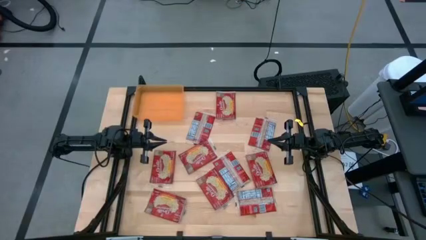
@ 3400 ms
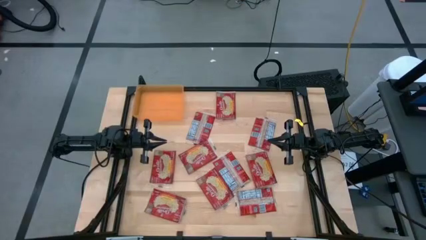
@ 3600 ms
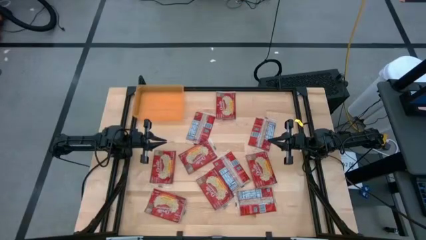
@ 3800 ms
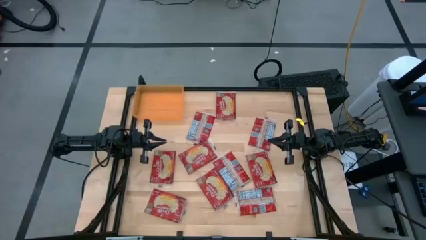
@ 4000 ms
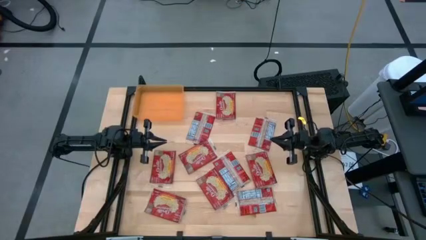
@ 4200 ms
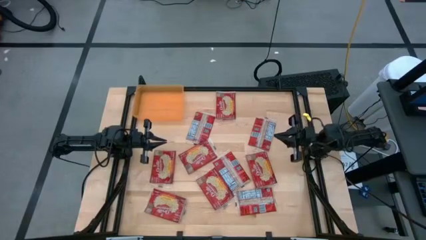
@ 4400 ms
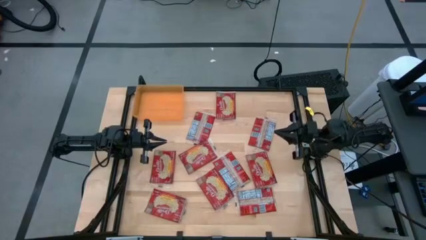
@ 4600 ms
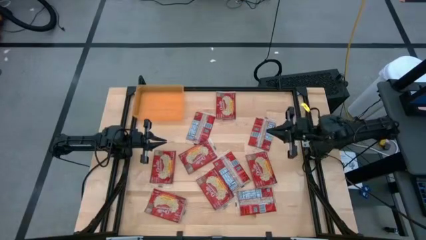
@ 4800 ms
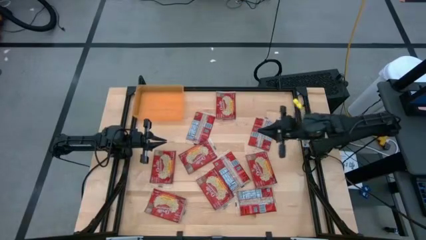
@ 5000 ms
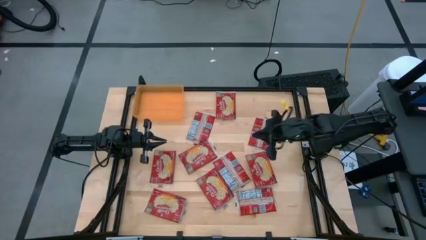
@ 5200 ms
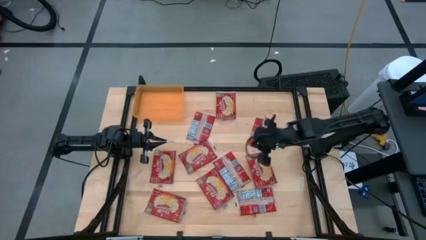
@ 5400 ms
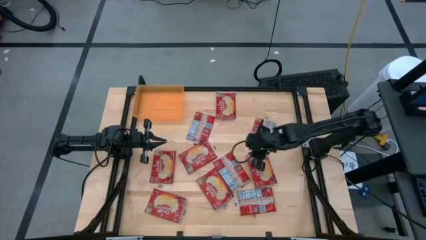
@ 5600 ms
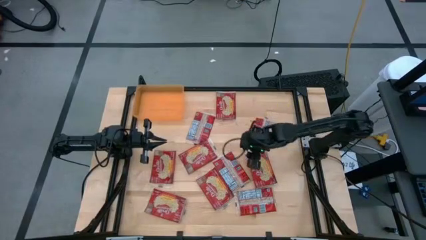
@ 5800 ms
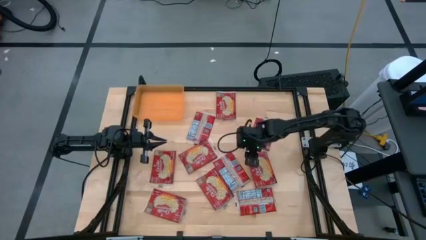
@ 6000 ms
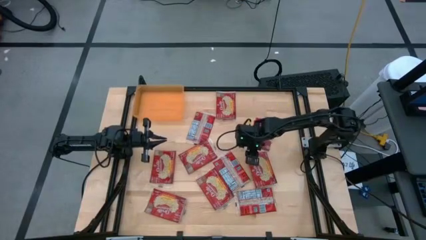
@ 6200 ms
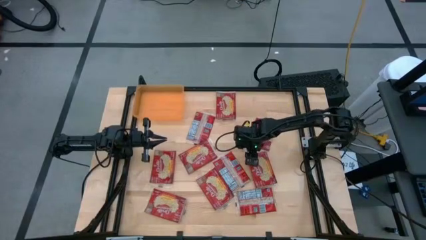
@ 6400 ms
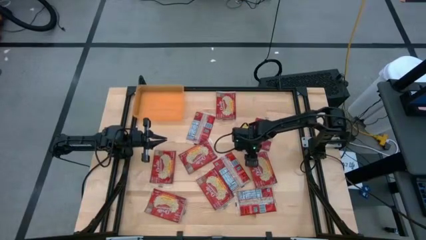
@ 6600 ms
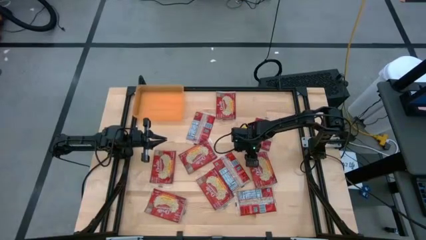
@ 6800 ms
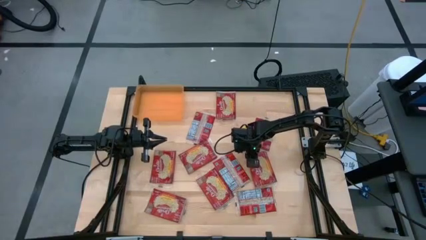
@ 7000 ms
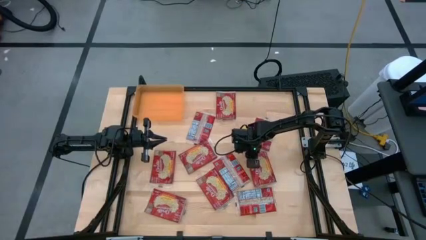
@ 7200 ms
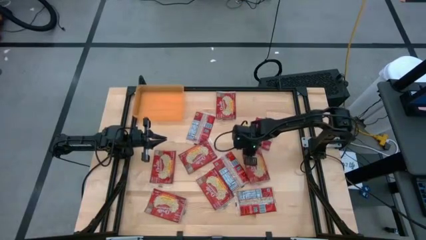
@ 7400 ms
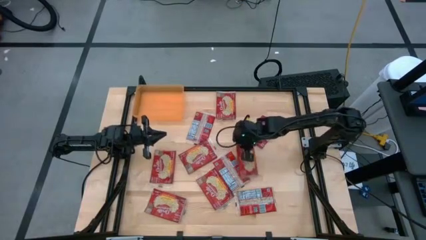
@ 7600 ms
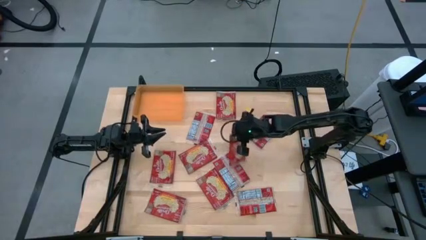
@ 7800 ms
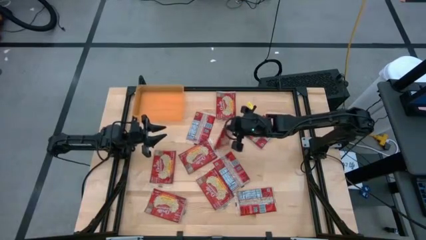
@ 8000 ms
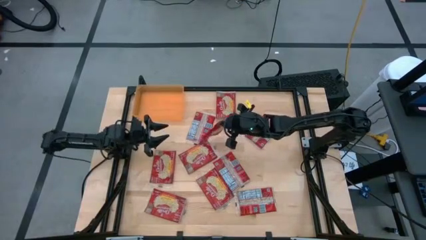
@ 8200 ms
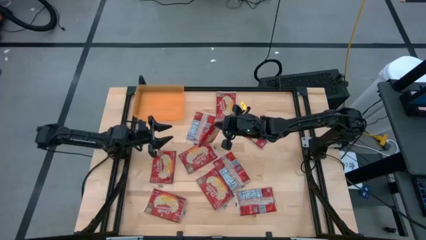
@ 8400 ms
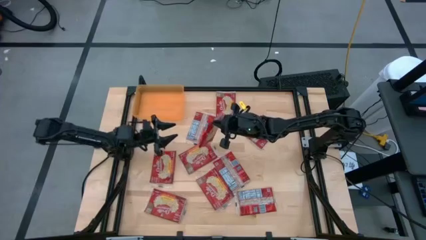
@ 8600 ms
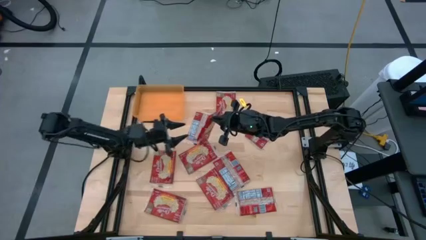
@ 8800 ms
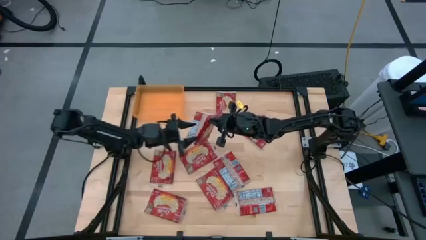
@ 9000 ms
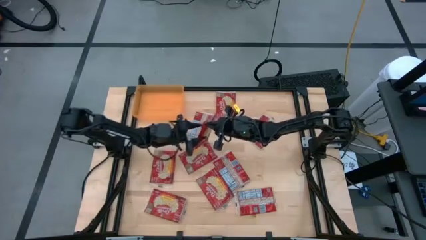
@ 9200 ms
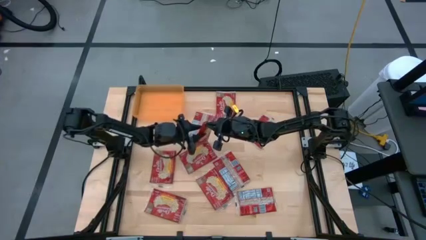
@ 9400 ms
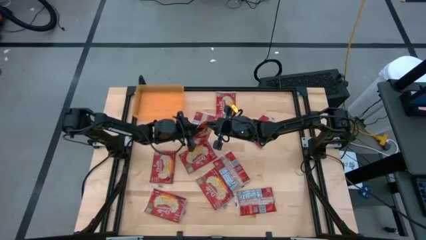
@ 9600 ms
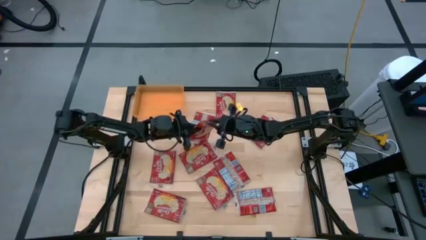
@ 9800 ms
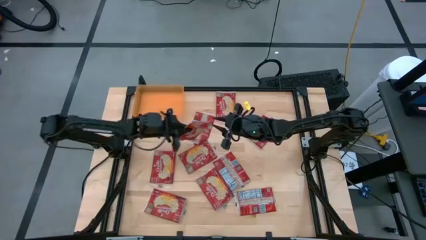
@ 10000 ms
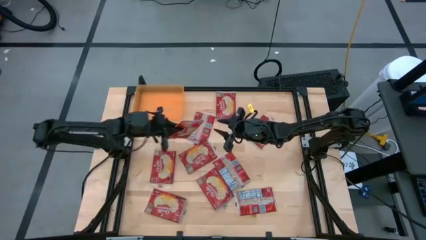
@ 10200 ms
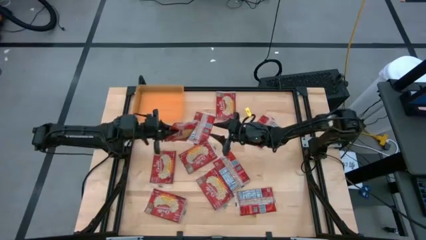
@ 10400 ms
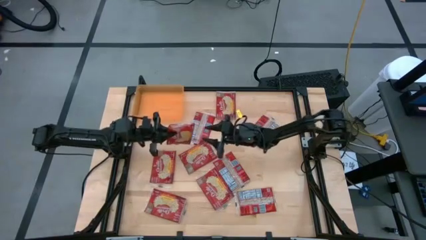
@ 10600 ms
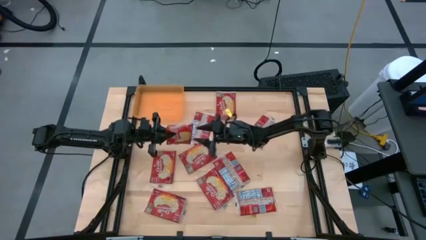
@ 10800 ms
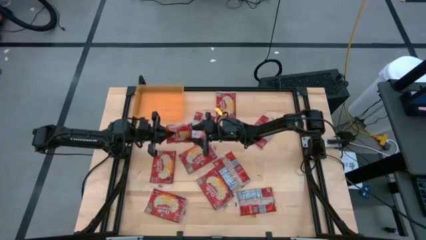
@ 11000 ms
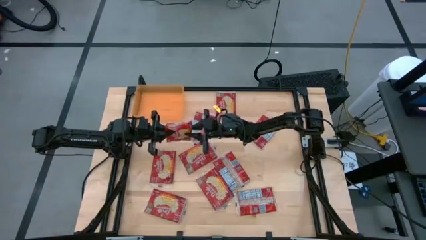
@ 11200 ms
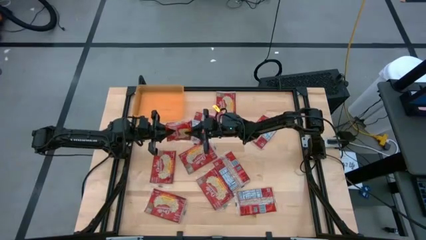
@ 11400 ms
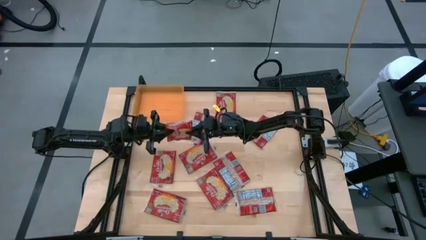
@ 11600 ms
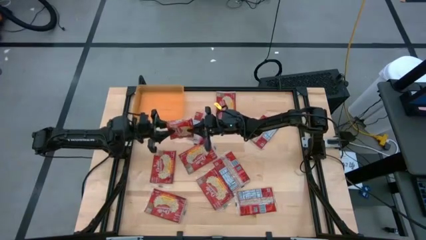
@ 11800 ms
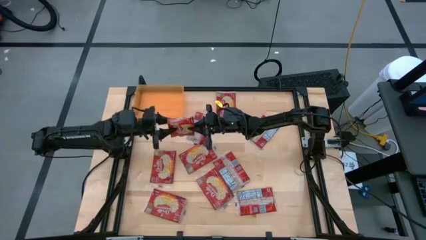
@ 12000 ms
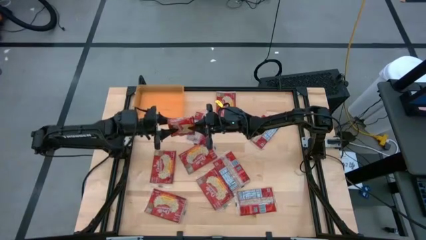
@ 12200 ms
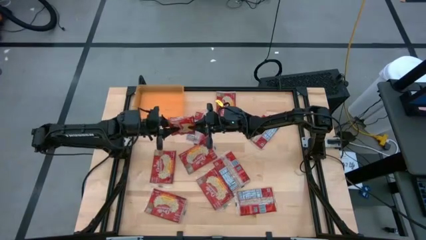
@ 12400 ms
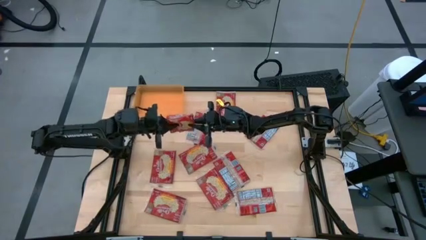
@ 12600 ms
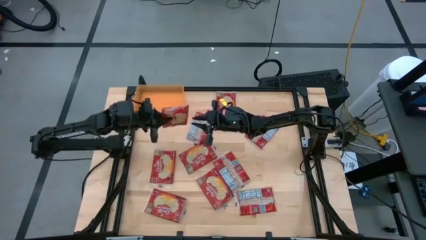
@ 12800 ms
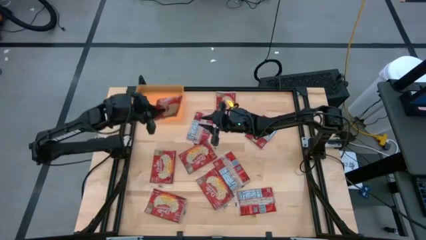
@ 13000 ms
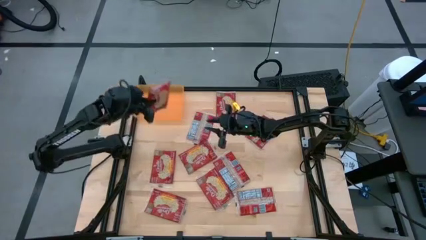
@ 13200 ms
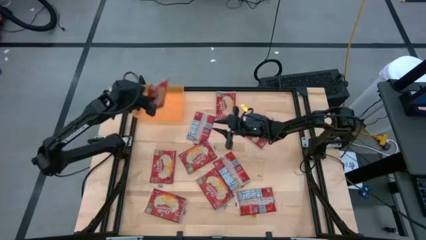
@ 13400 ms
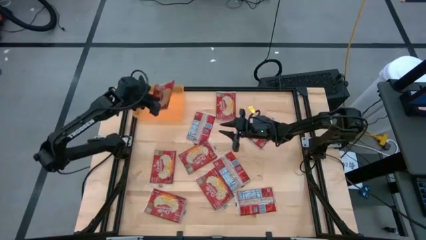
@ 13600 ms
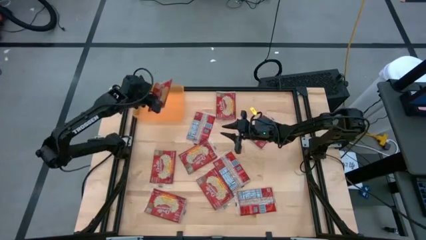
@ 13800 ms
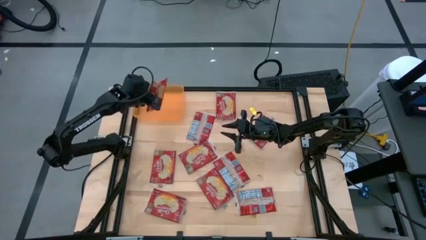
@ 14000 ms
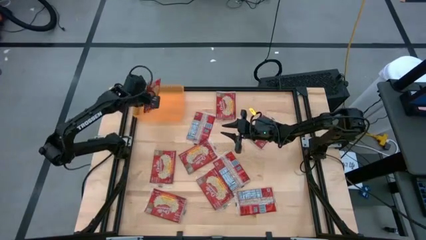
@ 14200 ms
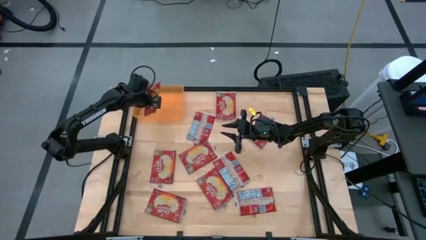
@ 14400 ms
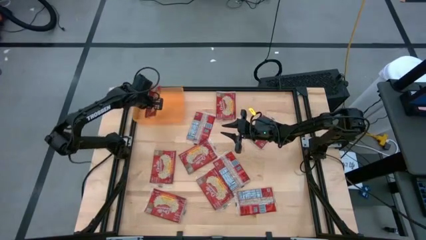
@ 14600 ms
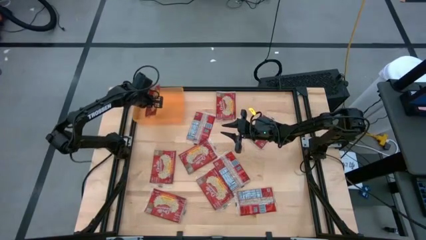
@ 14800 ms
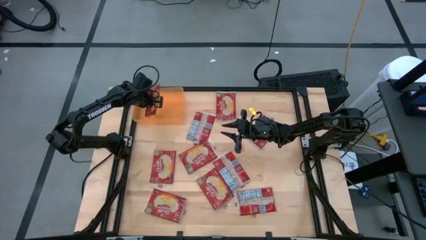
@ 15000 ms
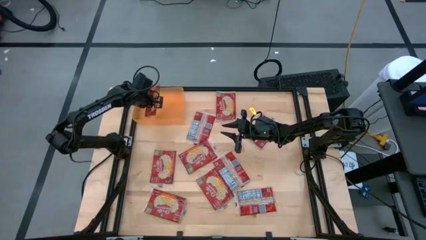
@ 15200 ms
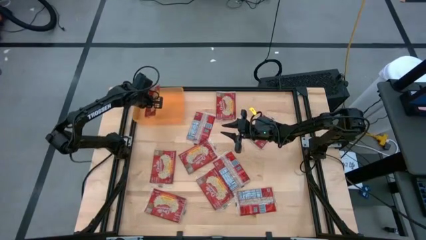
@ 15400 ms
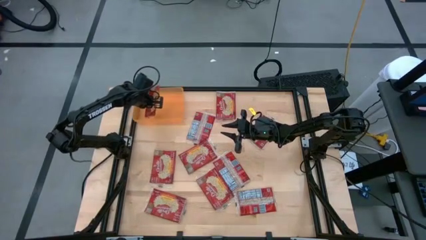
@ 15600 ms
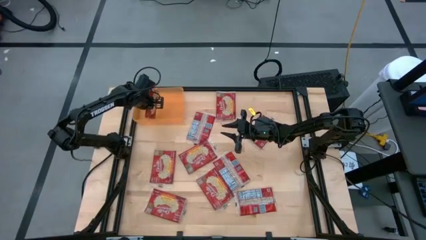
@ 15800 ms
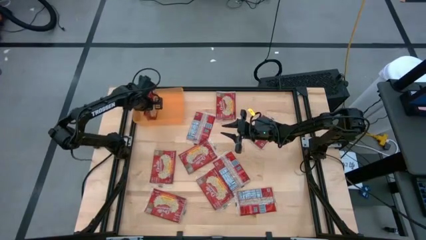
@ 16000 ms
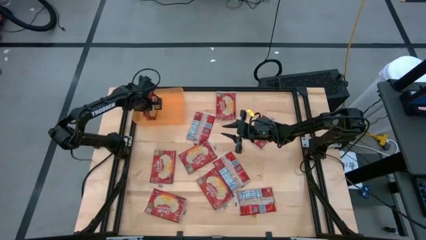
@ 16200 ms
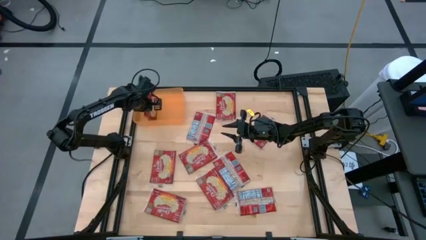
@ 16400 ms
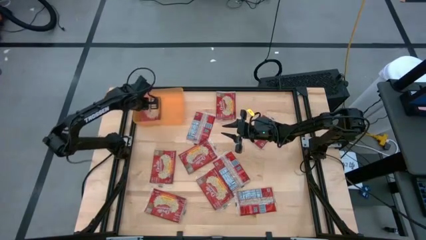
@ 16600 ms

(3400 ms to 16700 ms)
Task: Sort popcorn bags into baskets
Put the red popcorn bag into the orange bin
